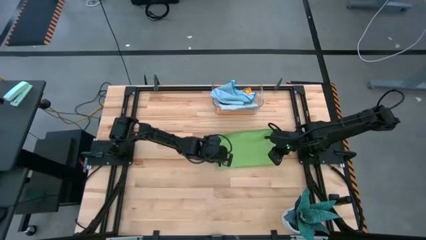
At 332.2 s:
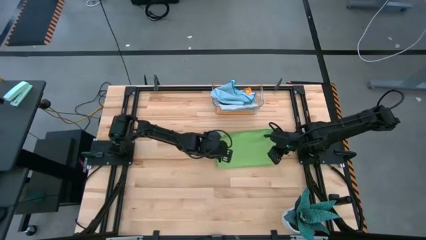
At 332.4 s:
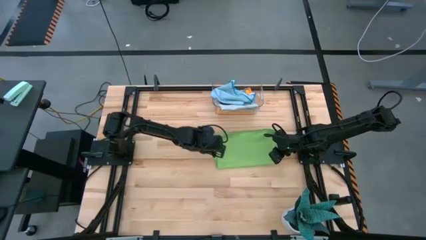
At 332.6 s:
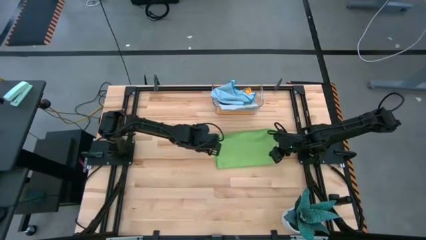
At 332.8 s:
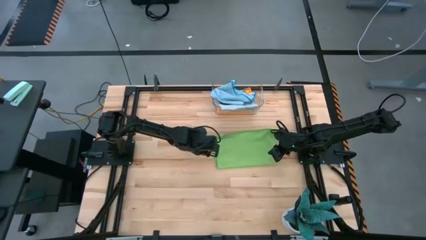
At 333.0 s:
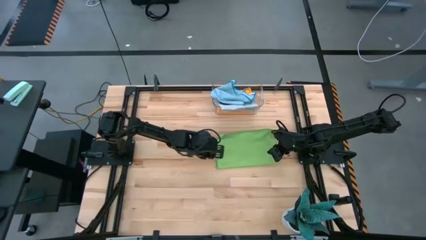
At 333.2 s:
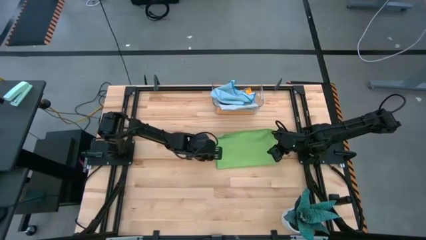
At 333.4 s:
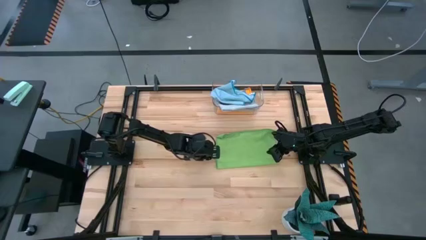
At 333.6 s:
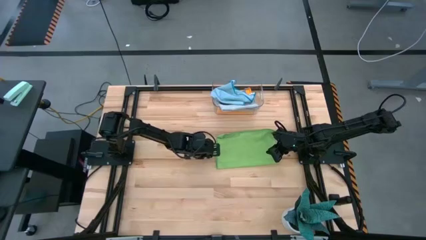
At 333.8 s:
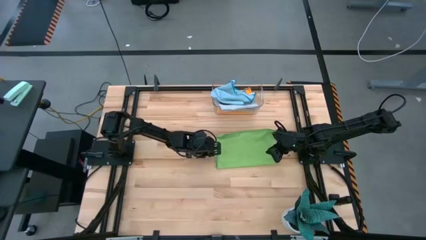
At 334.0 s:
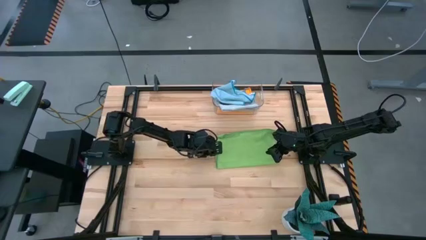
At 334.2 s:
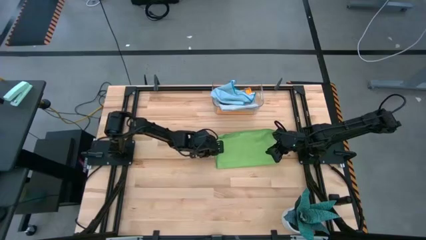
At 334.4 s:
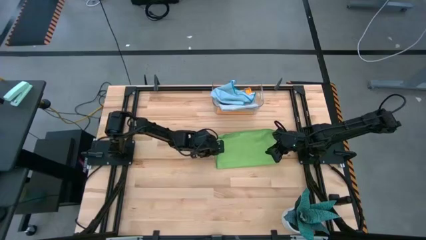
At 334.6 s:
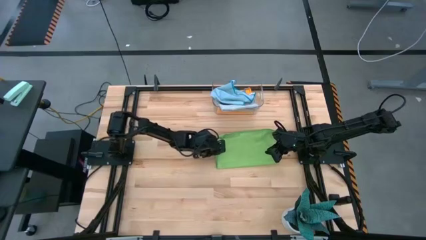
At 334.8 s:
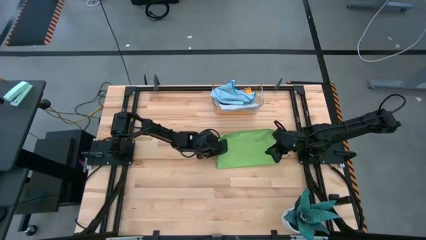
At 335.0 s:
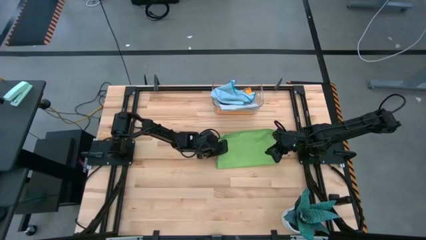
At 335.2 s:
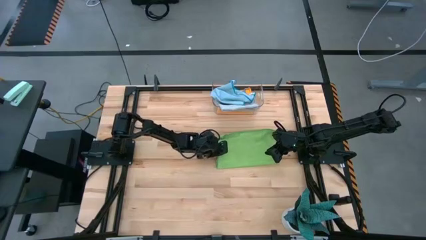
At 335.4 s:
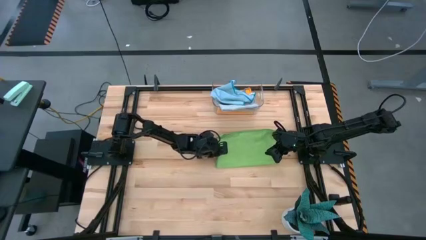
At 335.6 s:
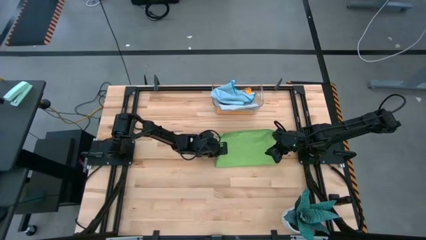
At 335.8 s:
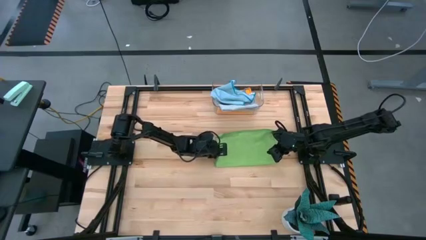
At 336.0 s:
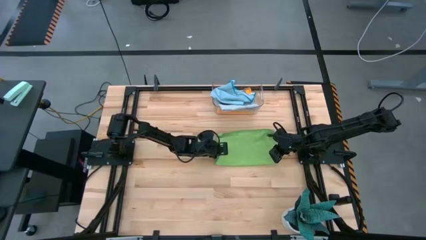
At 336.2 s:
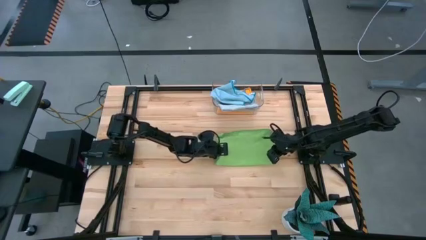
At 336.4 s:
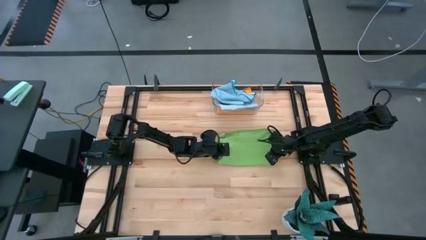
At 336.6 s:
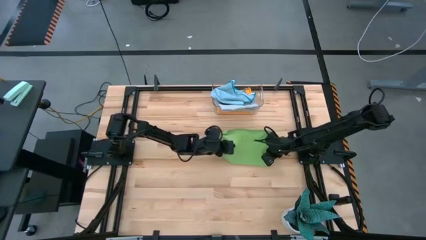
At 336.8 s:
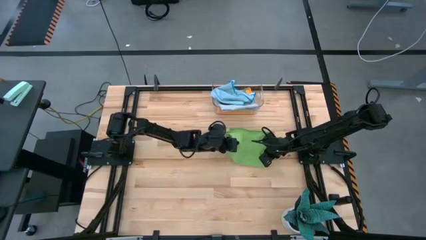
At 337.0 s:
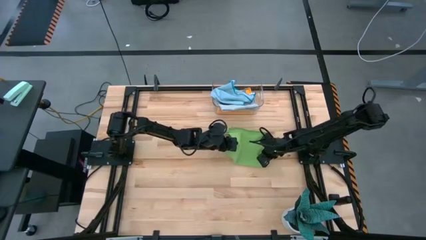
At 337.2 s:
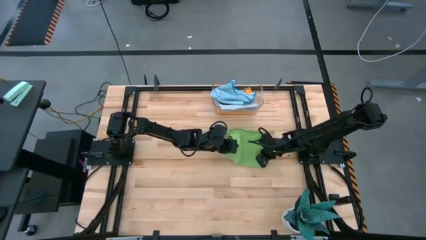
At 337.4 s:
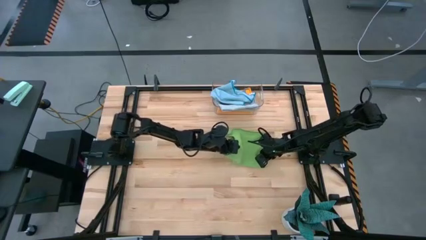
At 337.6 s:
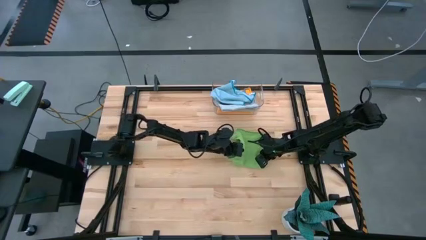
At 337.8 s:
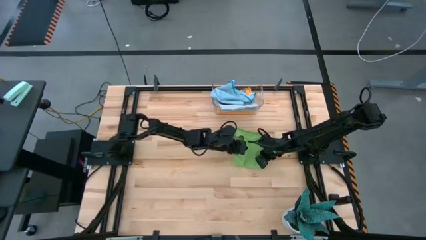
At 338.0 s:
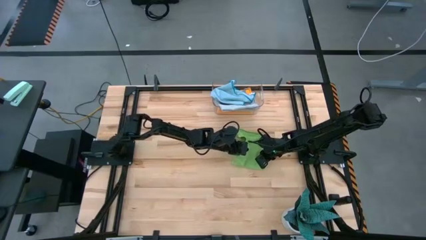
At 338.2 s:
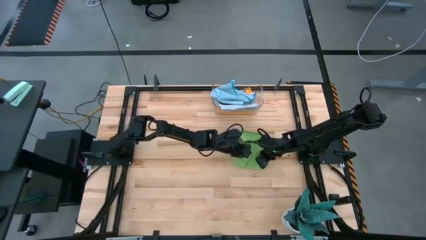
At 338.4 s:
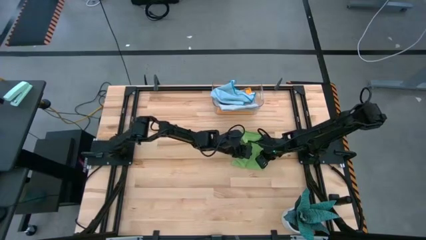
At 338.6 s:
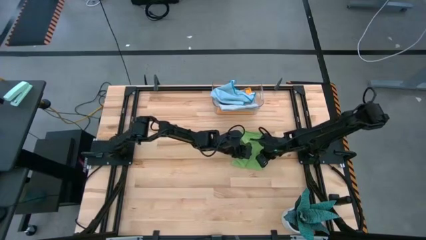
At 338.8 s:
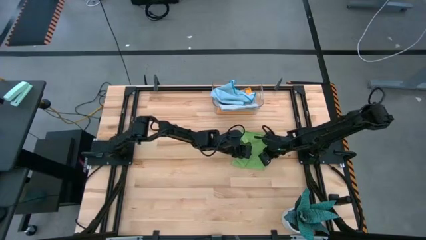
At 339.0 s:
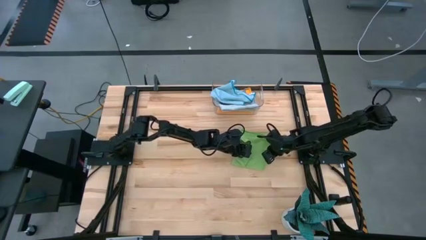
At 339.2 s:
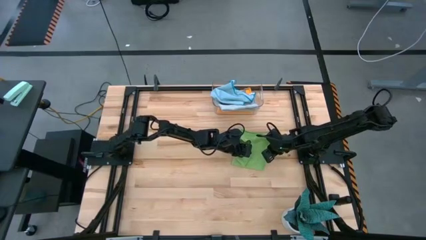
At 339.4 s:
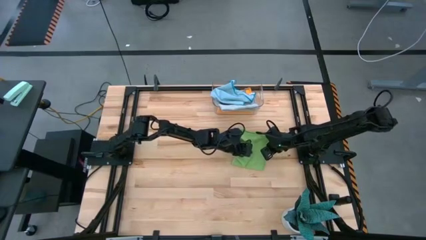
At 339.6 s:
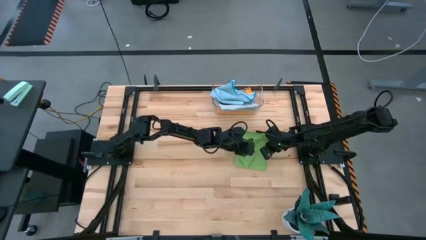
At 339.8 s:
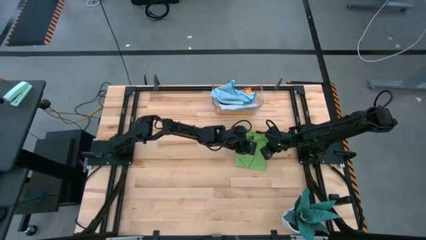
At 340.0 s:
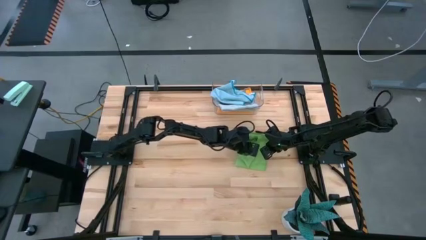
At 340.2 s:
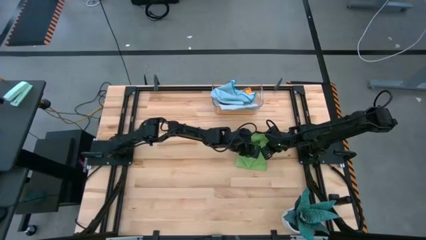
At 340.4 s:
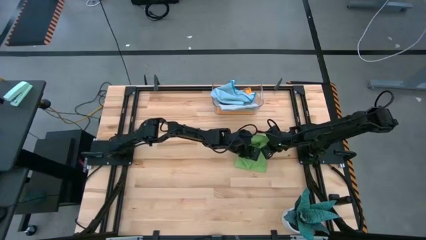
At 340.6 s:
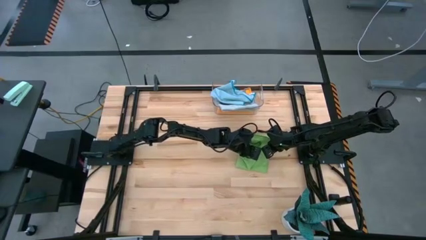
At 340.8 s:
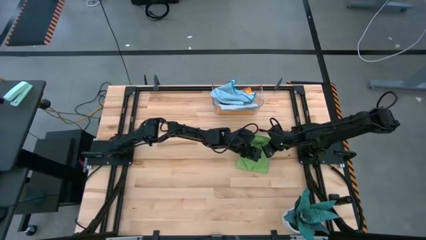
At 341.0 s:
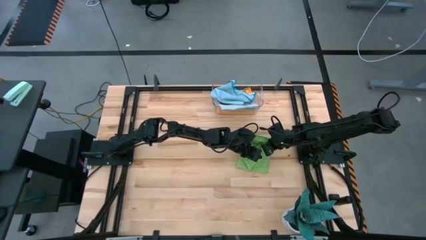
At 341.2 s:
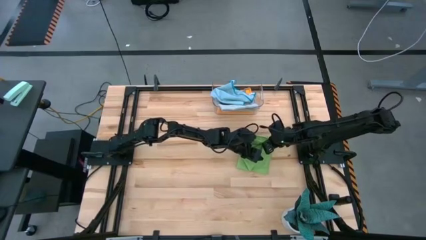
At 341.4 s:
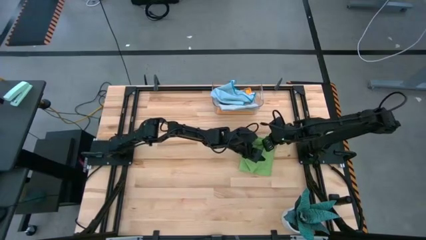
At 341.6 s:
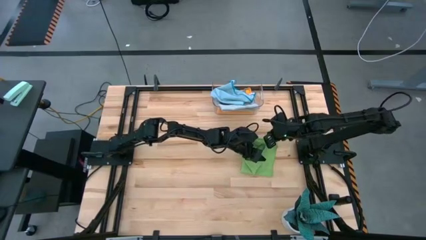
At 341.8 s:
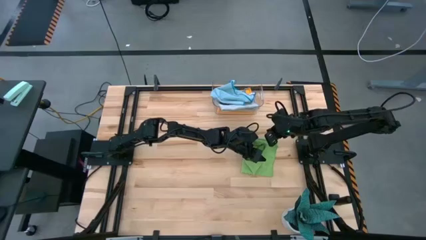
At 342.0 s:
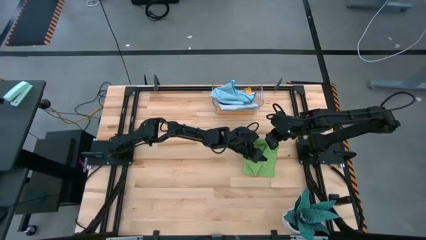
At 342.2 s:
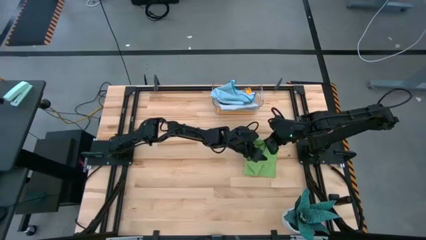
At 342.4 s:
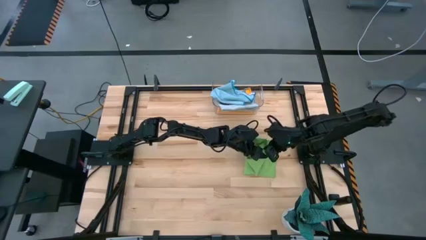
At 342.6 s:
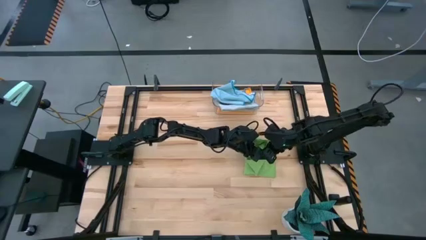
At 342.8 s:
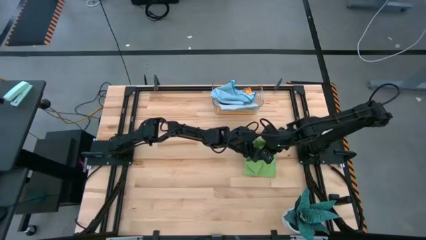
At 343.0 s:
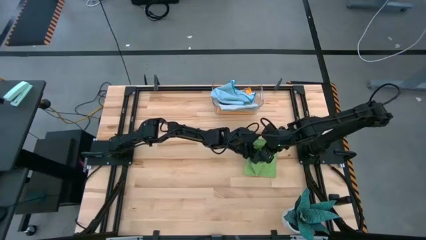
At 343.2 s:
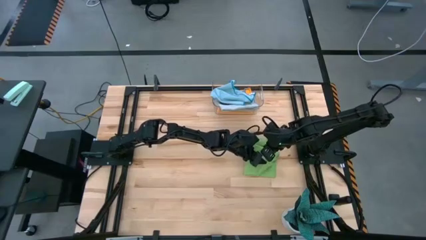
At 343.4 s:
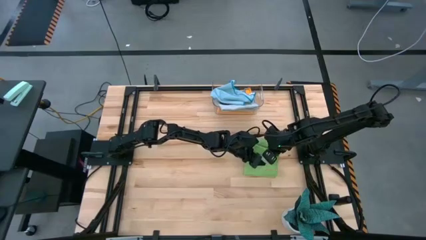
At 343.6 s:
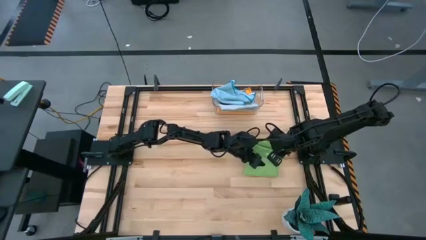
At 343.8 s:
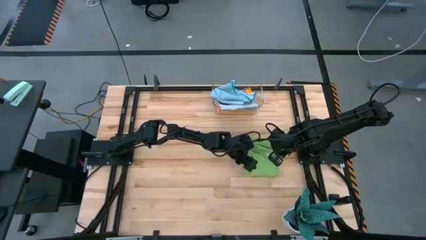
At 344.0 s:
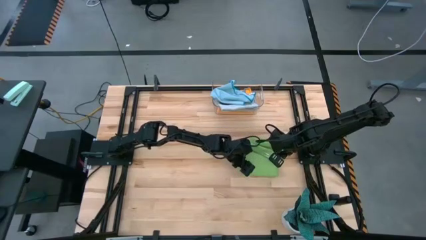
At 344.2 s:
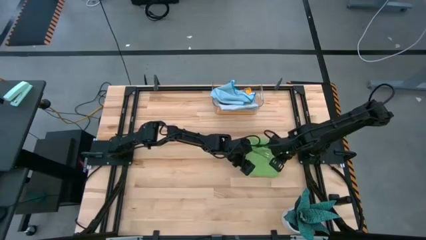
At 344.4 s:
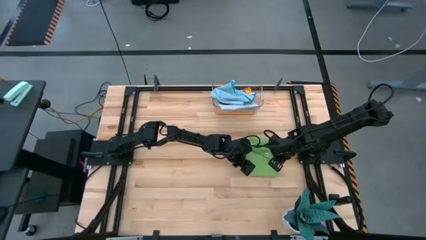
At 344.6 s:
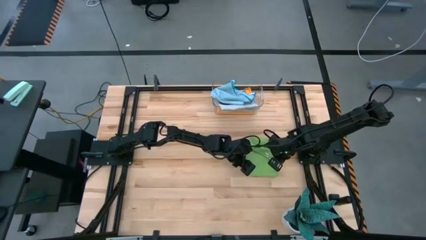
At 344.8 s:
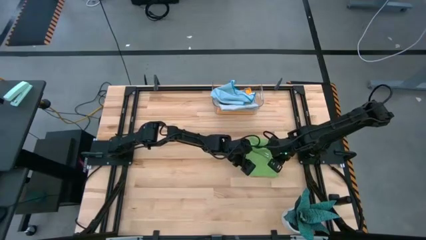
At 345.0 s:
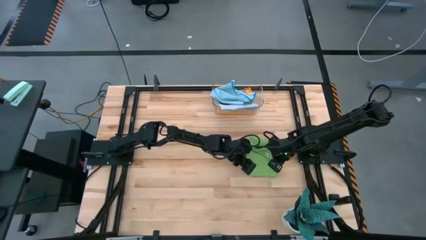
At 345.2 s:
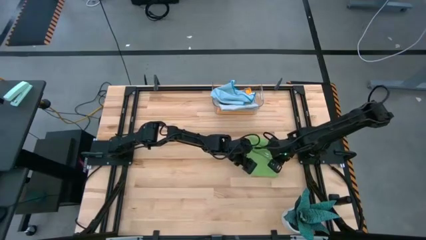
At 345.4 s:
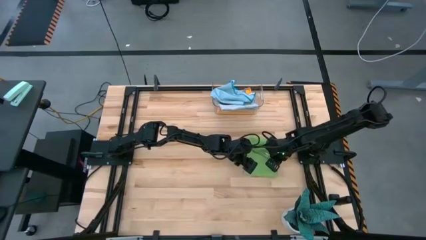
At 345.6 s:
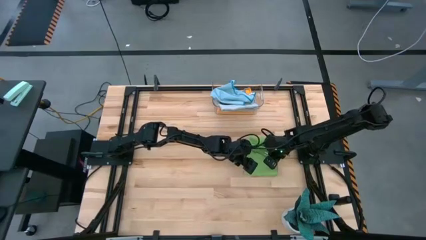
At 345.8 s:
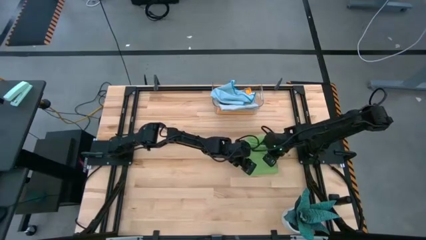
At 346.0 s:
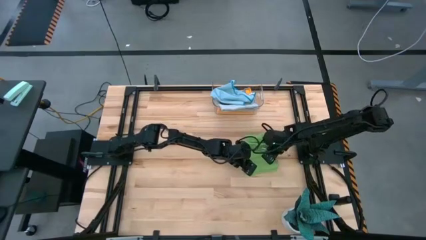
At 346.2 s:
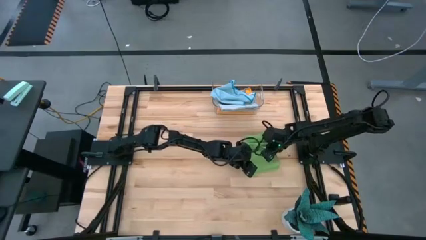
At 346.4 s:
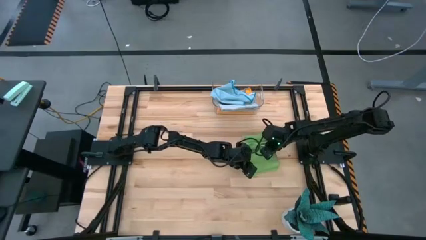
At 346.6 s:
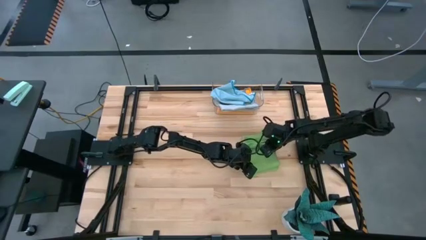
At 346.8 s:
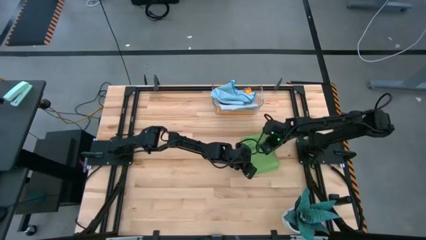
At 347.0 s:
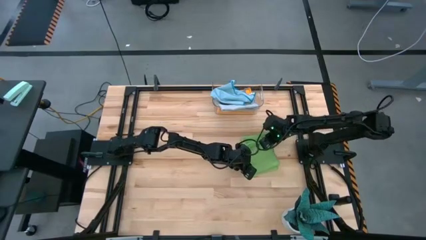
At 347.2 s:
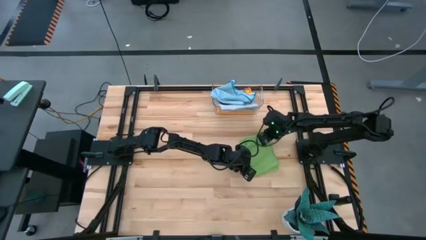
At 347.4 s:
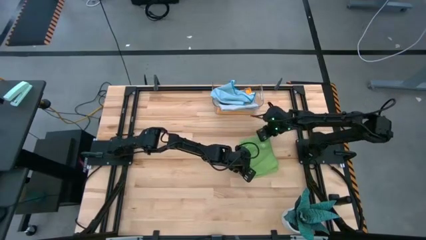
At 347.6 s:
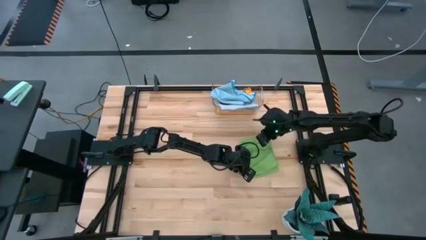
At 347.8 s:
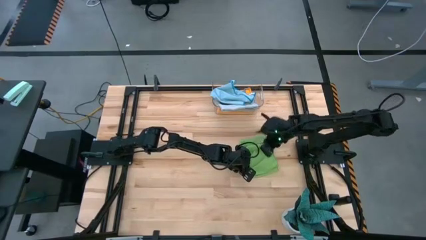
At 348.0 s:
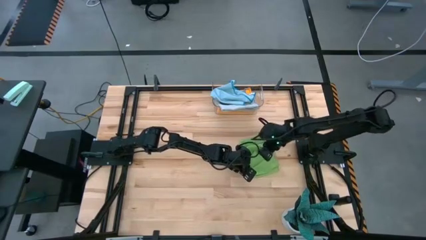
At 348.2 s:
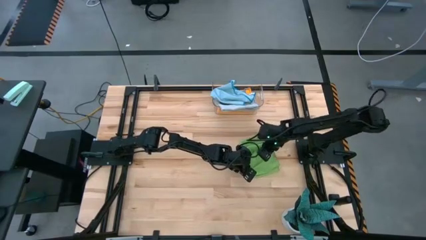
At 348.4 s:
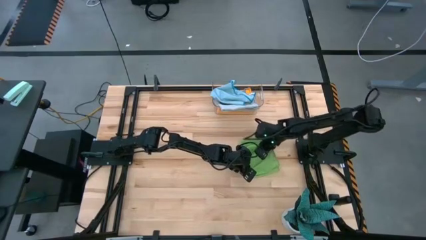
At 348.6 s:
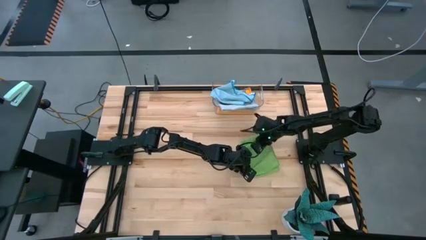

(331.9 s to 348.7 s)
Task: Fold microfiber towels
Fold the green microfiber cloth
